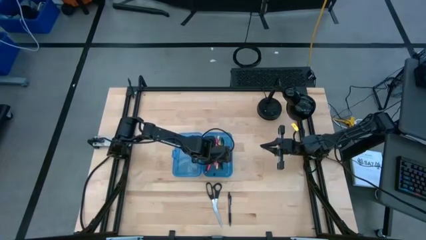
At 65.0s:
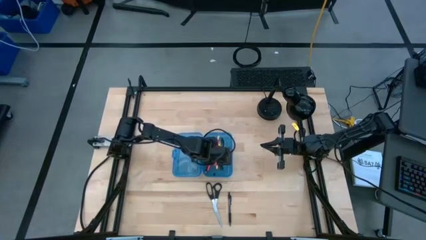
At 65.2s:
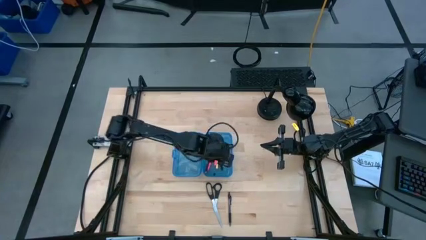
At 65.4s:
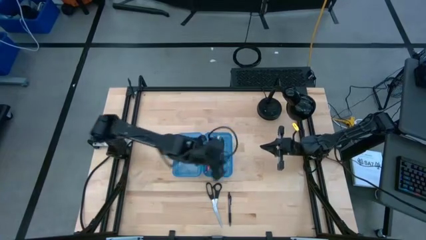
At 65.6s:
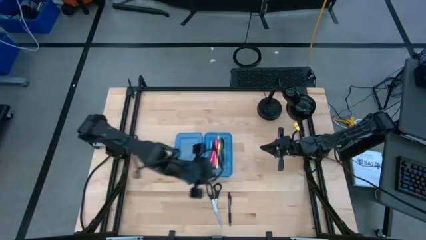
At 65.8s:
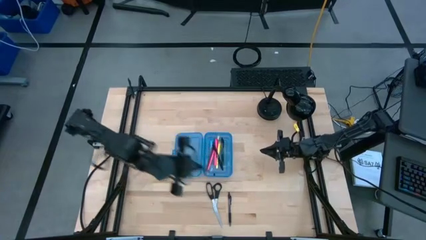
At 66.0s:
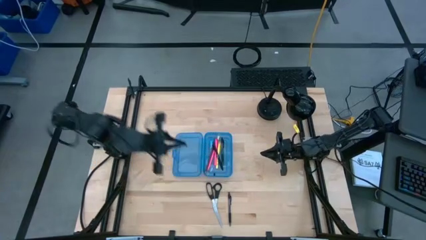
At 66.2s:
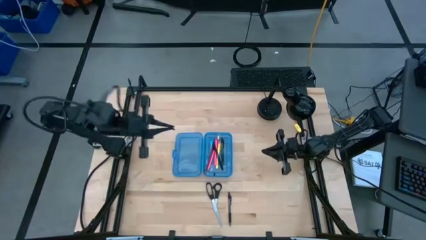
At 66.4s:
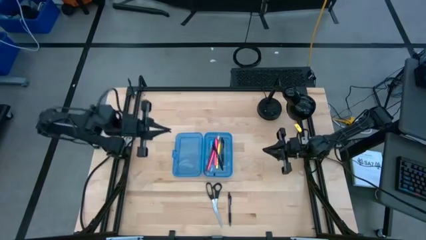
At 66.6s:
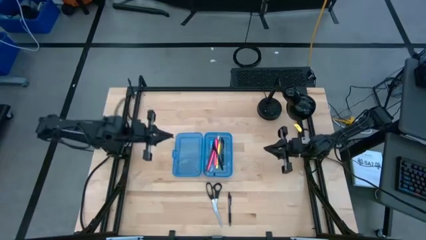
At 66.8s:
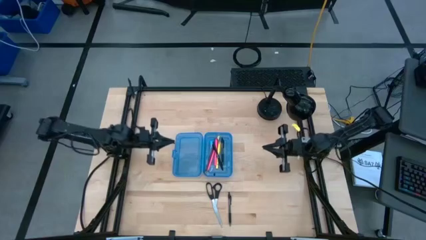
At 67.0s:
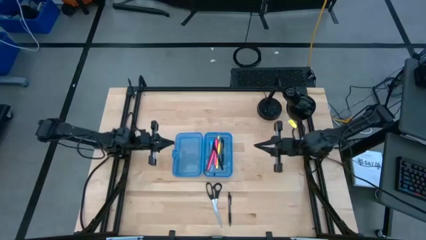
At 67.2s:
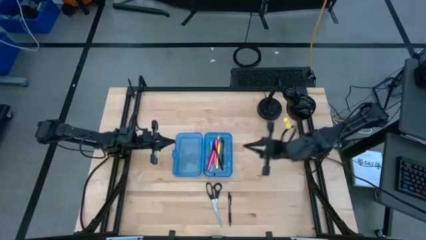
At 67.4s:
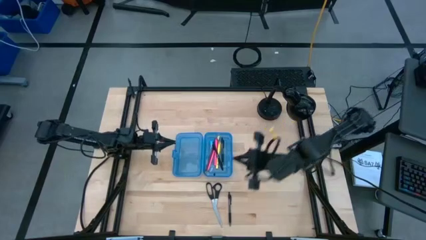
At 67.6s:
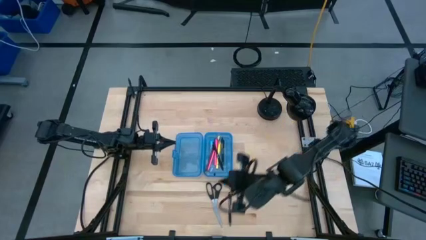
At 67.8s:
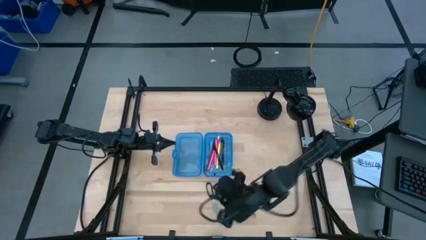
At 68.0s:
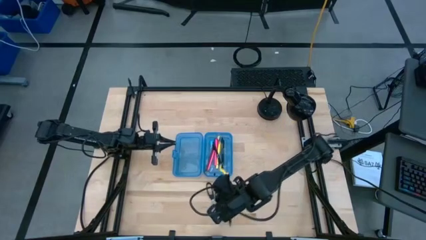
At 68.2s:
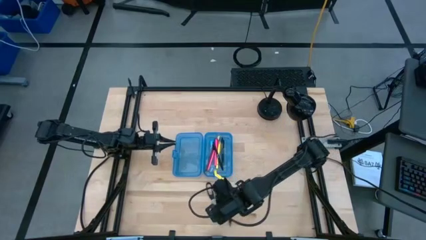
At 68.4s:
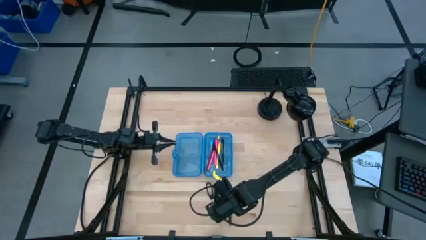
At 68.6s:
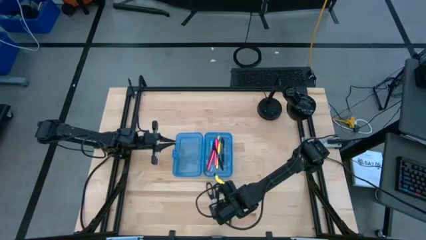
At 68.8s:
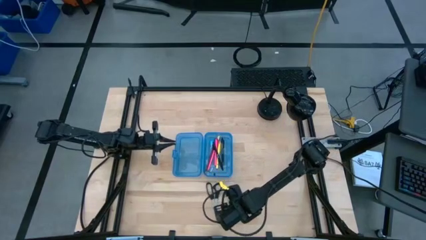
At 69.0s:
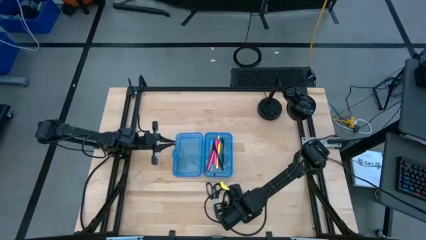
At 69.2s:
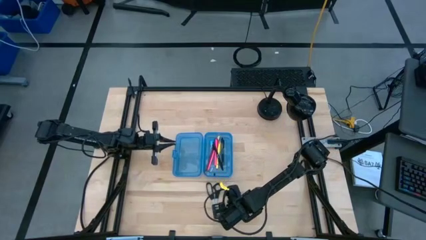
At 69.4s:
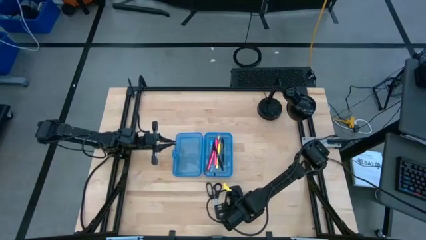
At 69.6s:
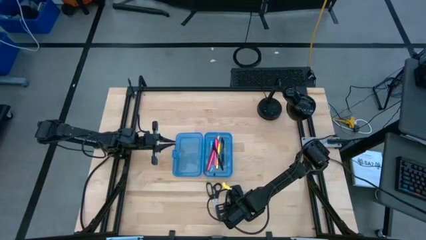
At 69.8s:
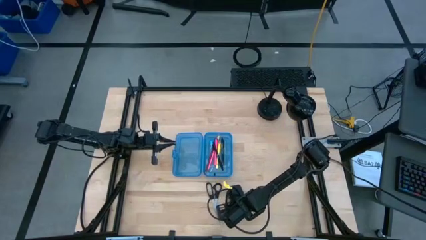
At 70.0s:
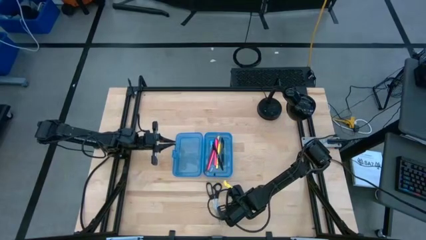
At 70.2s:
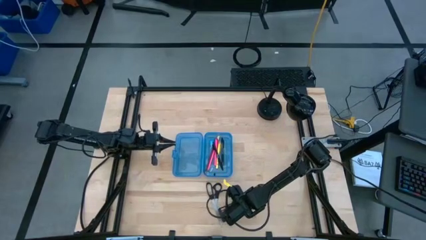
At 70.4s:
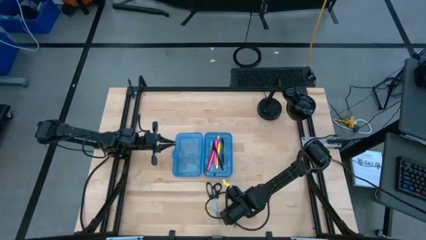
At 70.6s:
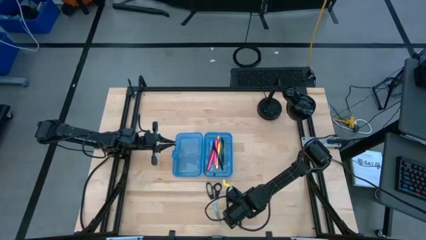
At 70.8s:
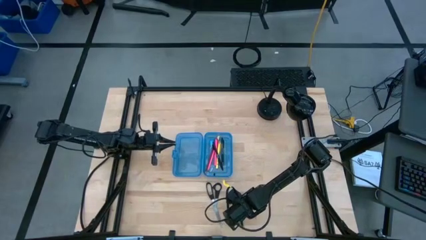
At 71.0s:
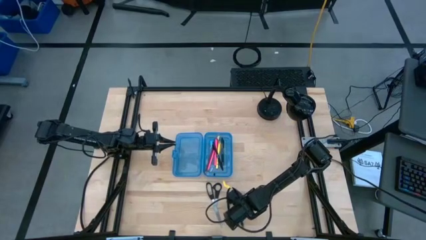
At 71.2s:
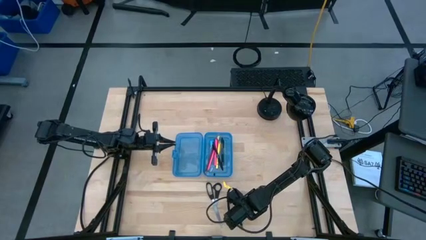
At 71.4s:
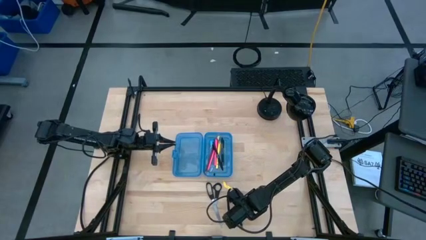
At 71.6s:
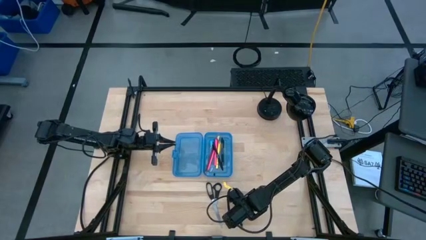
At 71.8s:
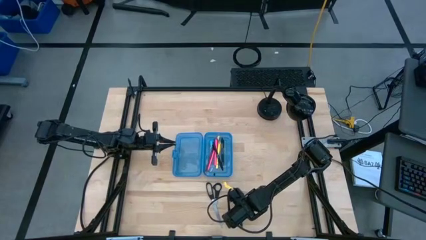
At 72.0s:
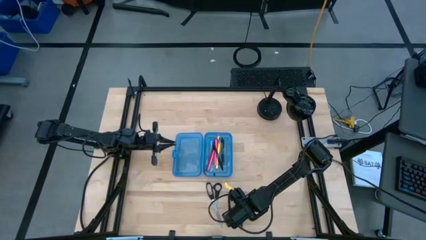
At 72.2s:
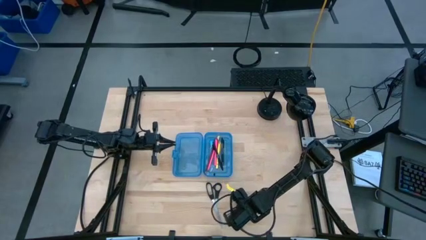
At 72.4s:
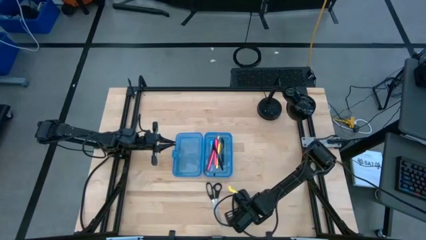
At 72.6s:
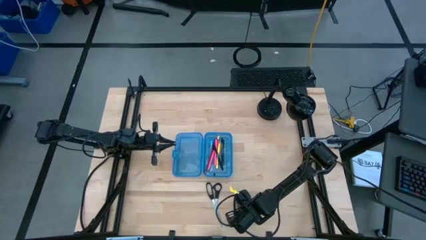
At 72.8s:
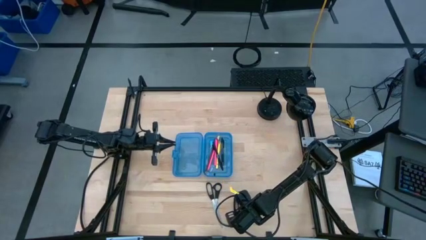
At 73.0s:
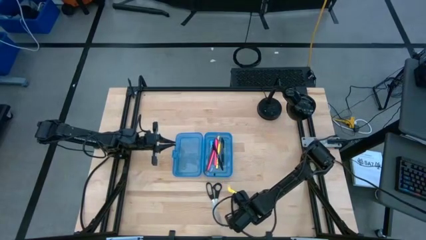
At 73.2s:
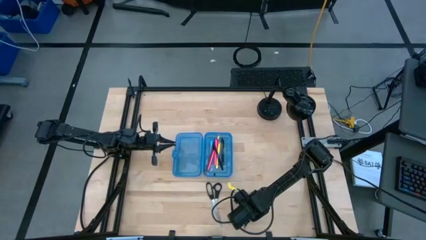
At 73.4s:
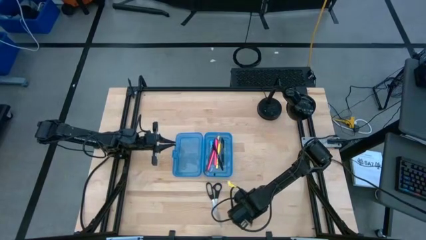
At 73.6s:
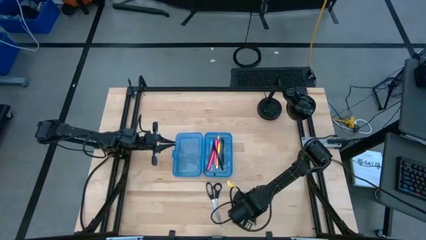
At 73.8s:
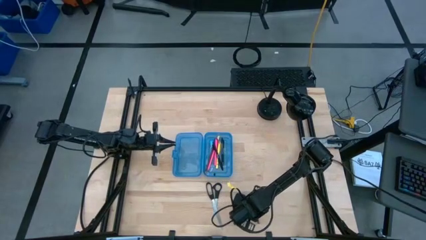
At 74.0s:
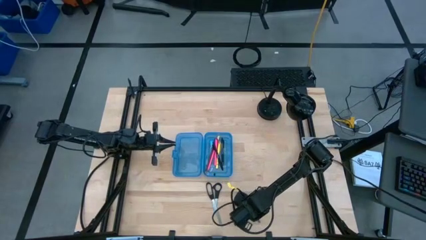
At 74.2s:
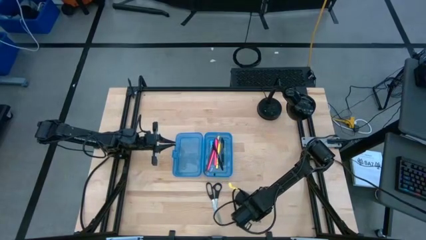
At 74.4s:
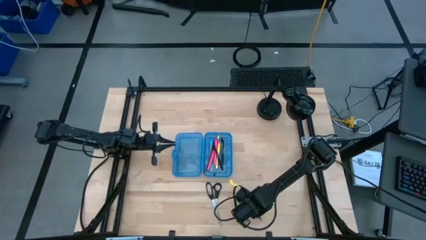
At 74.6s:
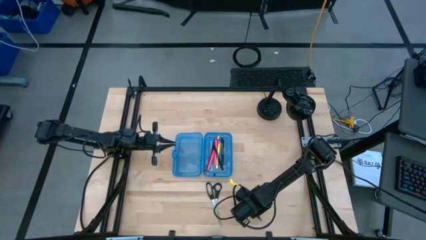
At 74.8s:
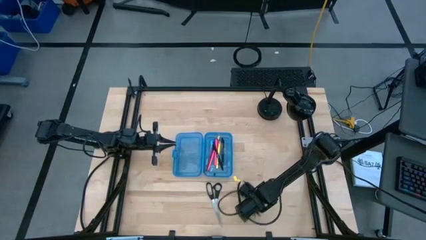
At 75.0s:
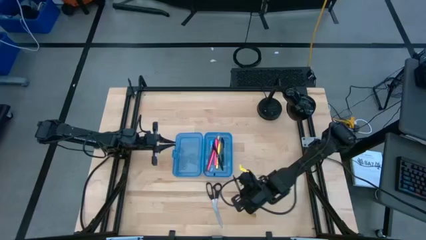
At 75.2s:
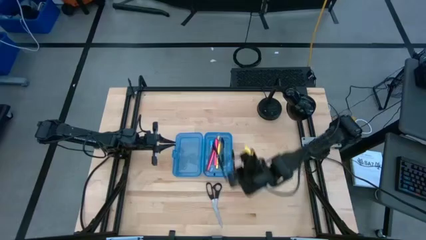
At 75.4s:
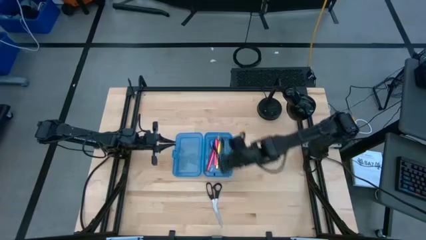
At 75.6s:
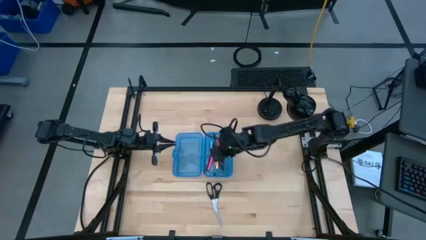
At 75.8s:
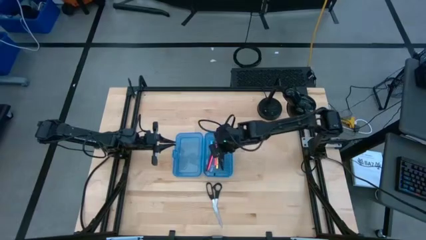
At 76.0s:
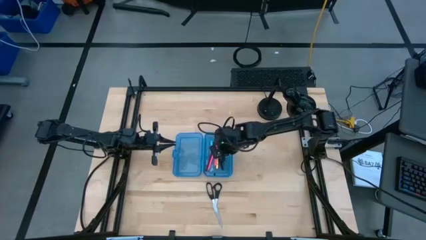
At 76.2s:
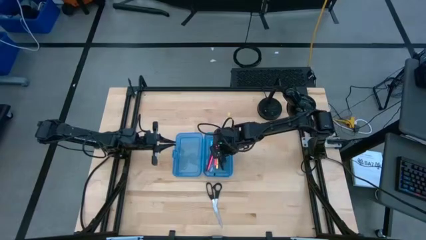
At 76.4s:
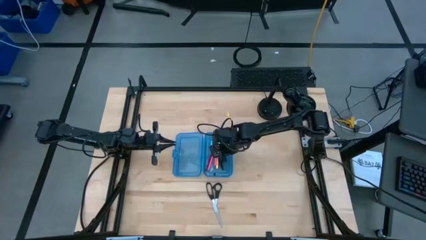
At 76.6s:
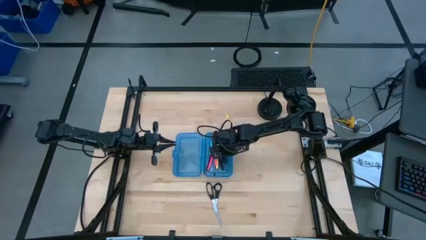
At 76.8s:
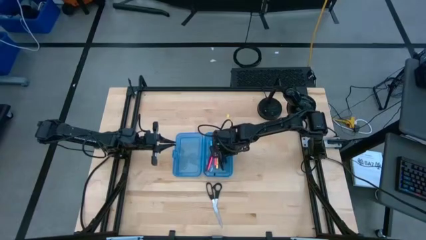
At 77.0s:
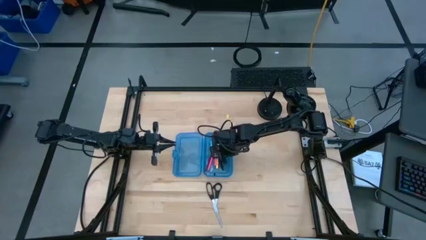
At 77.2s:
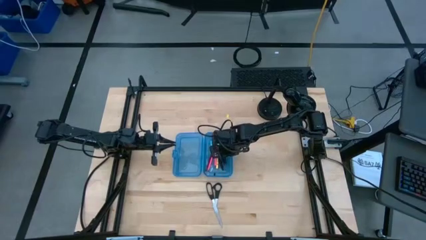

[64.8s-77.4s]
Task: Pick & place school supplies into a supply box
Put the black pen into the blue pencil box

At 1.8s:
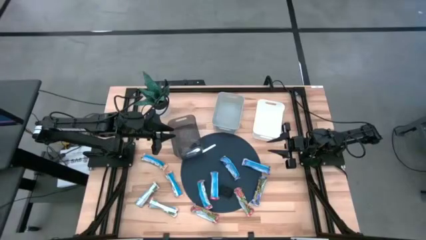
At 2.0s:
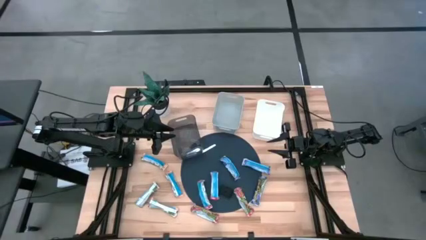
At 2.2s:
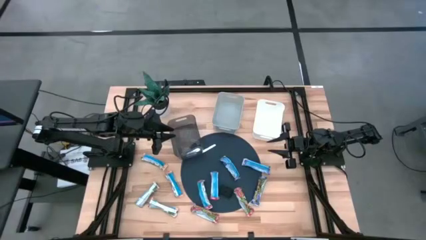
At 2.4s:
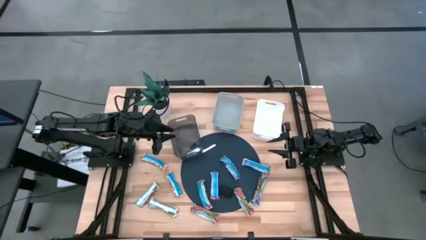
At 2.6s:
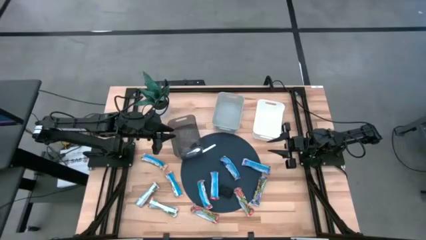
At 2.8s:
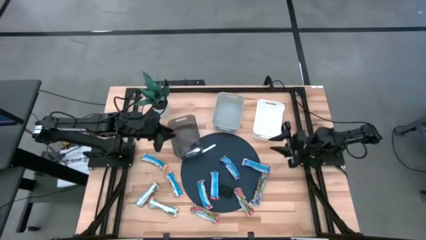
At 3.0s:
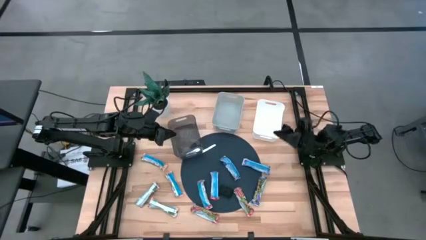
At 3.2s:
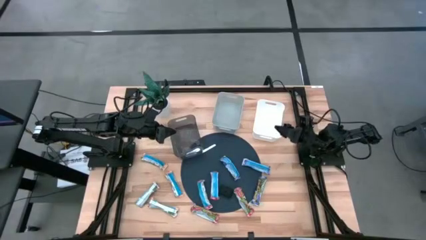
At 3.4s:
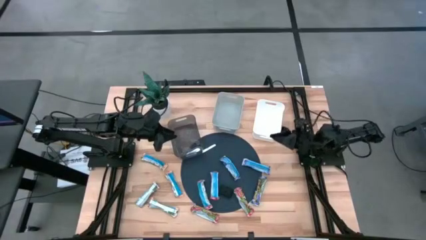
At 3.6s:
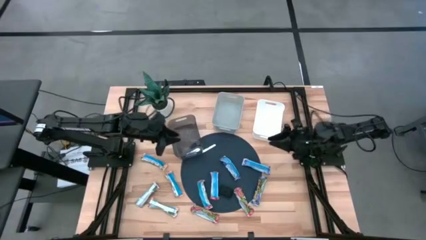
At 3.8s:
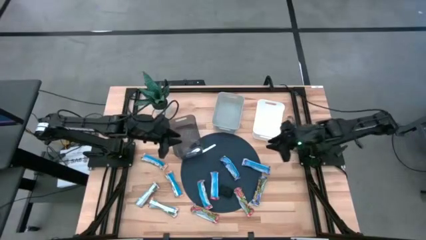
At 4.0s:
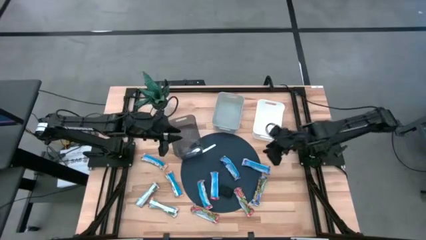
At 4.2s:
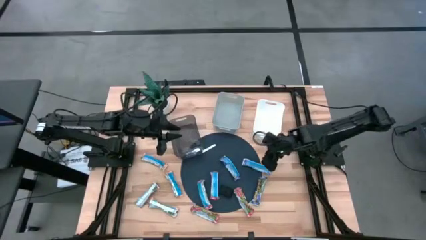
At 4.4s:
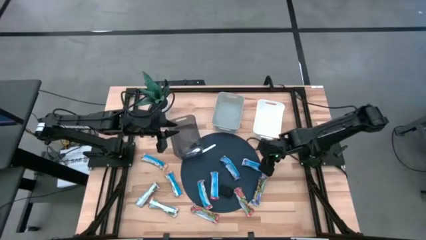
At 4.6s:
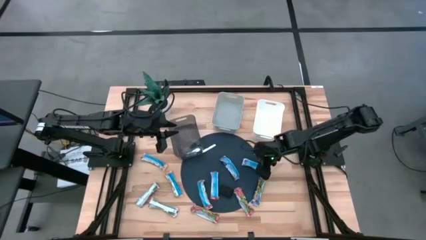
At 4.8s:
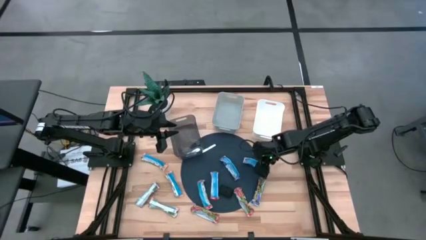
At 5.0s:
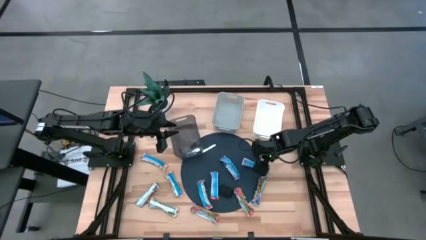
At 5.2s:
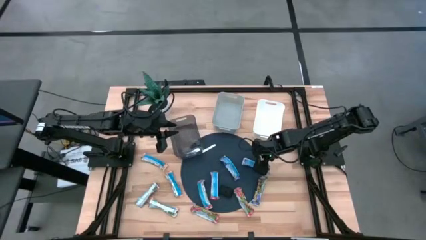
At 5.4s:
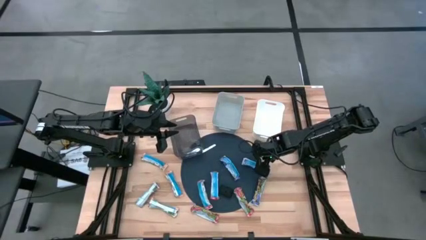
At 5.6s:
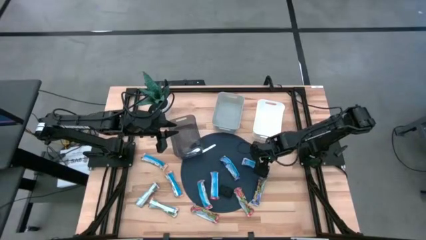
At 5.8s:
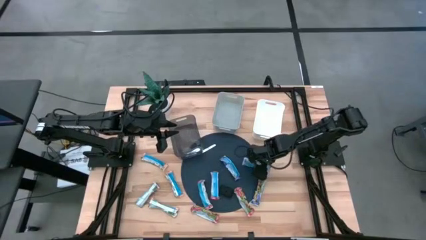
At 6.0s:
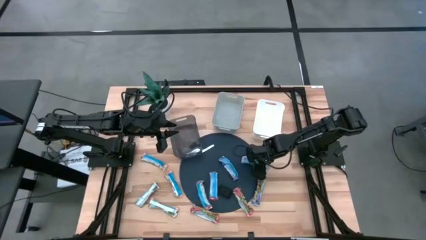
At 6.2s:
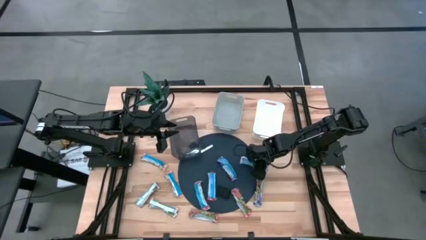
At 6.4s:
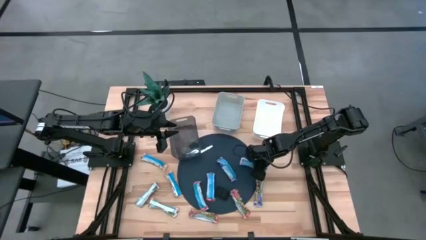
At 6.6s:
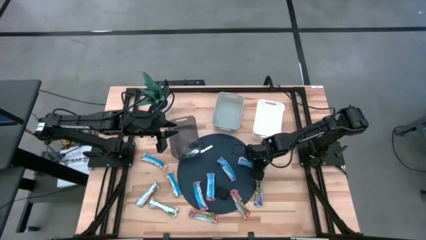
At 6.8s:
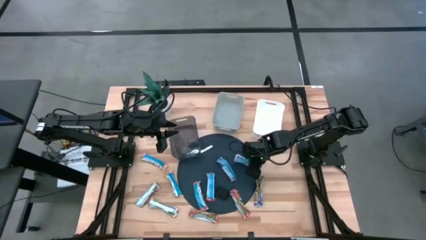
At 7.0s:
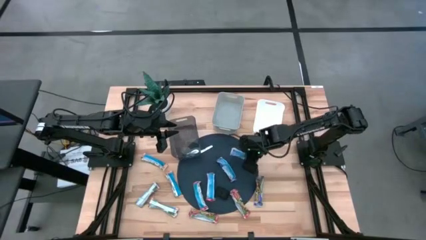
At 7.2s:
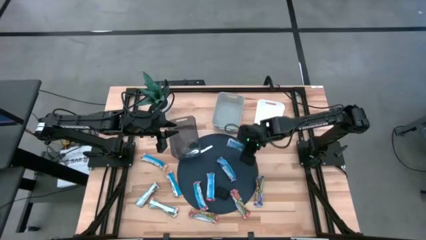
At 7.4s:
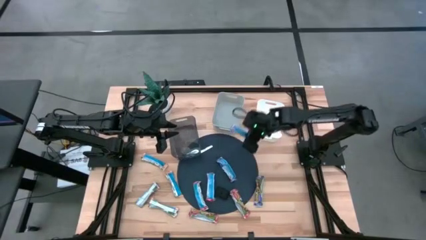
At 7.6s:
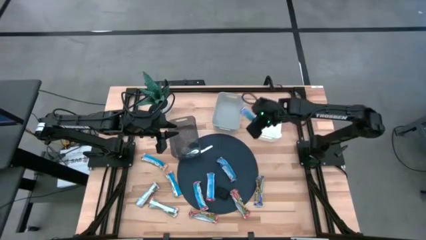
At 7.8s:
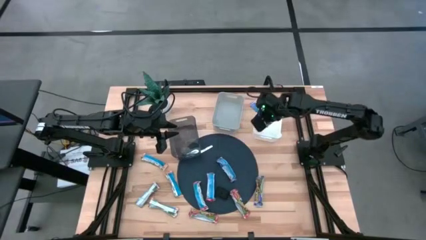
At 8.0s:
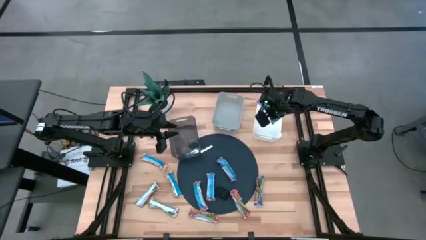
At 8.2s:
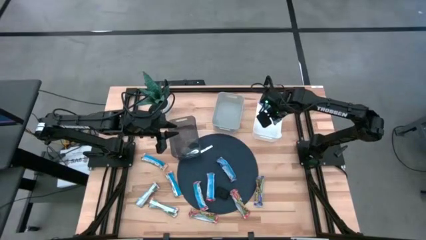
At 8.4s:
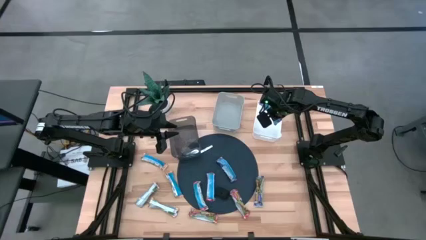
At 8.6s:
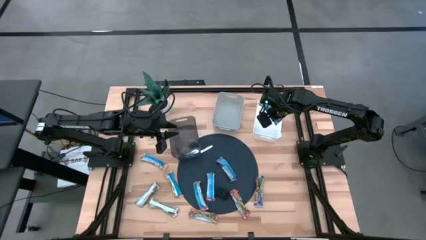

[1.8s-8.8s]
Task: Pick and place Granola Bars by type
Put the top right blue granola bar into the white bin
